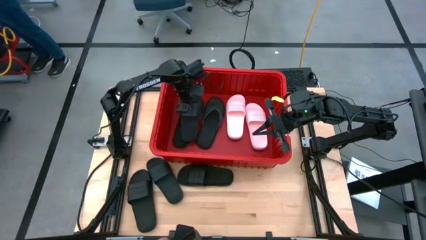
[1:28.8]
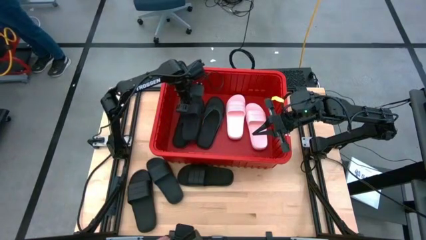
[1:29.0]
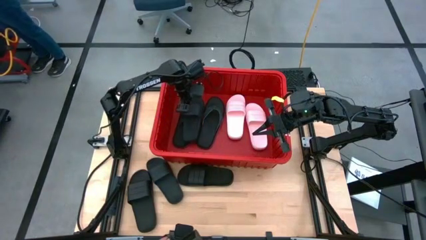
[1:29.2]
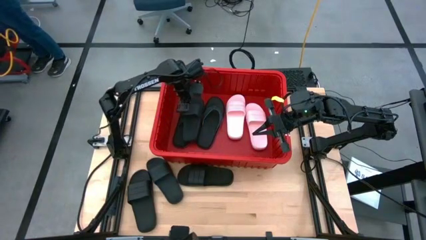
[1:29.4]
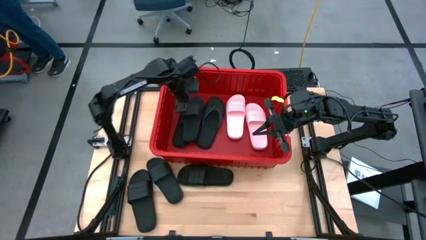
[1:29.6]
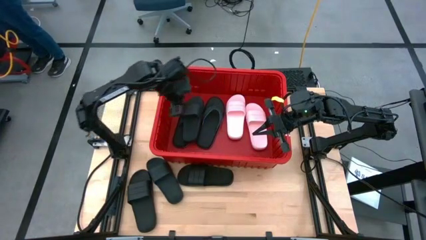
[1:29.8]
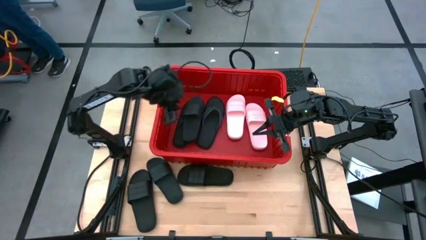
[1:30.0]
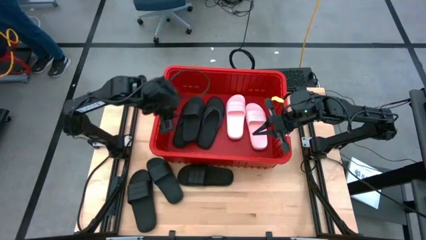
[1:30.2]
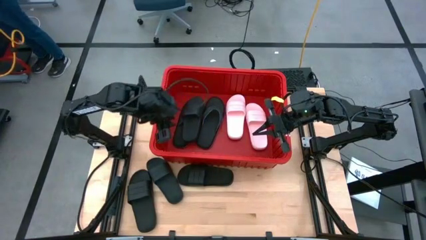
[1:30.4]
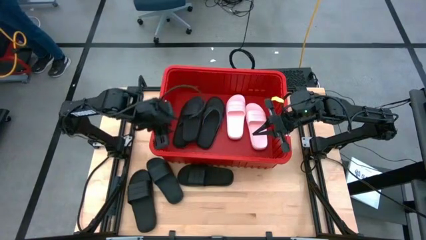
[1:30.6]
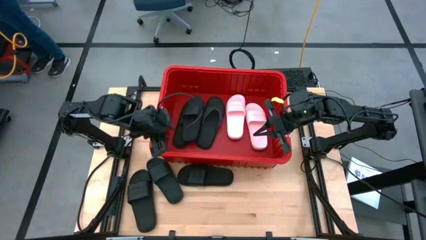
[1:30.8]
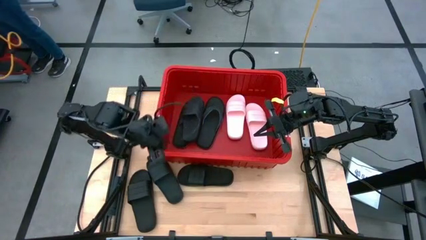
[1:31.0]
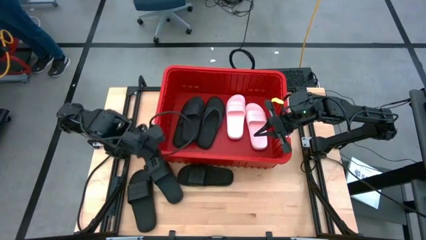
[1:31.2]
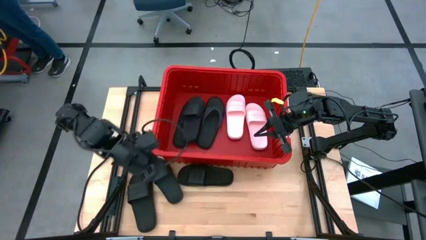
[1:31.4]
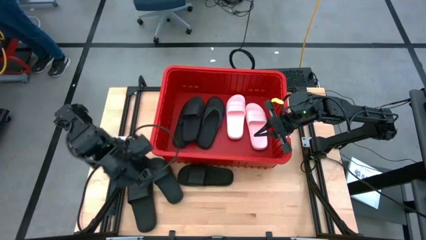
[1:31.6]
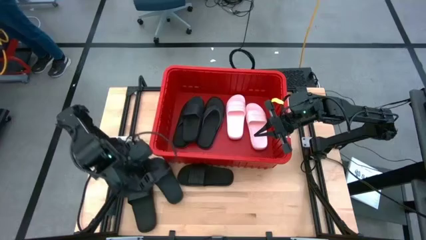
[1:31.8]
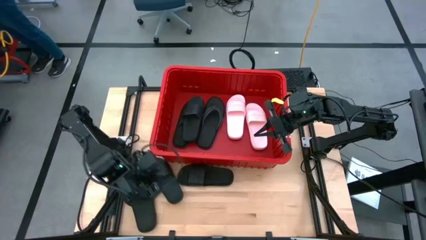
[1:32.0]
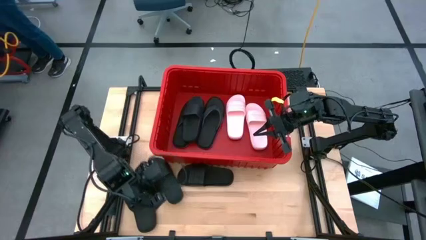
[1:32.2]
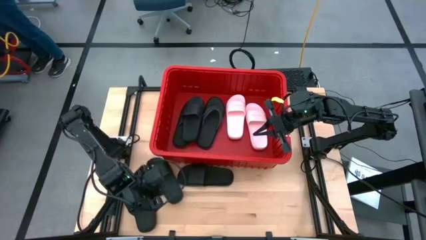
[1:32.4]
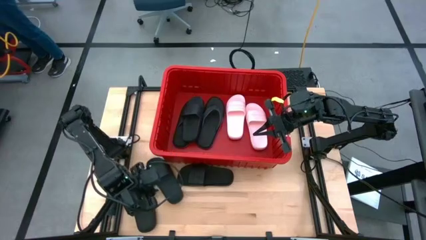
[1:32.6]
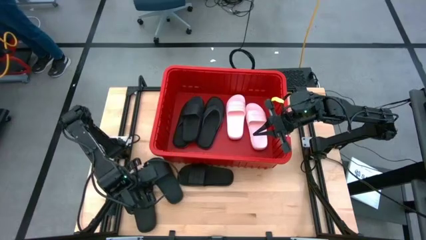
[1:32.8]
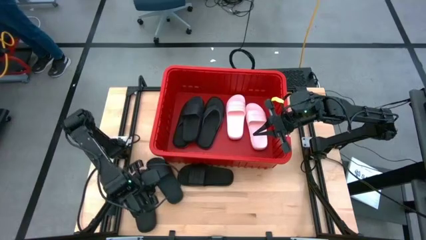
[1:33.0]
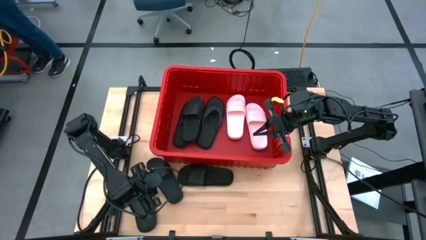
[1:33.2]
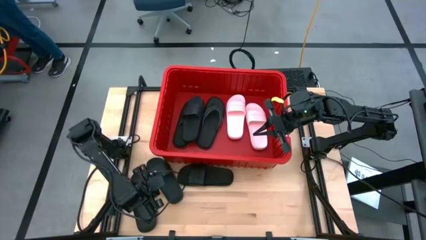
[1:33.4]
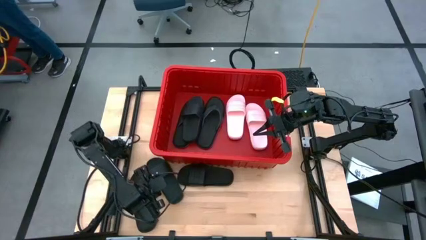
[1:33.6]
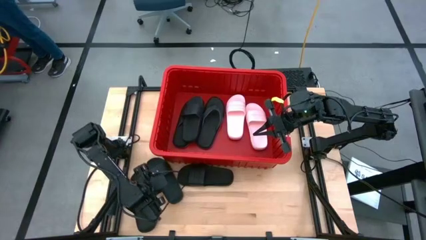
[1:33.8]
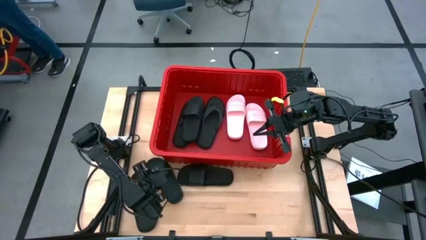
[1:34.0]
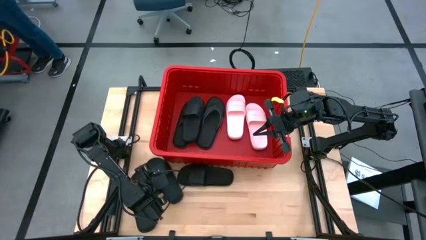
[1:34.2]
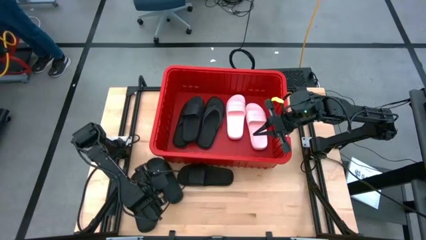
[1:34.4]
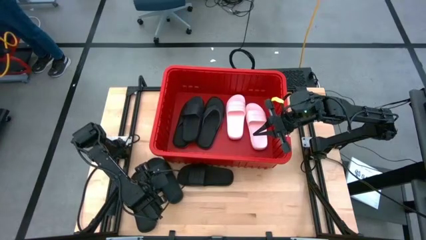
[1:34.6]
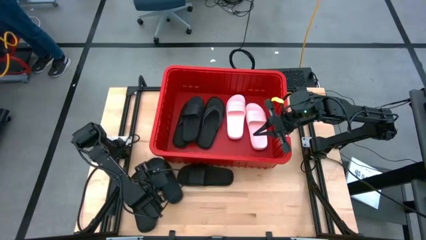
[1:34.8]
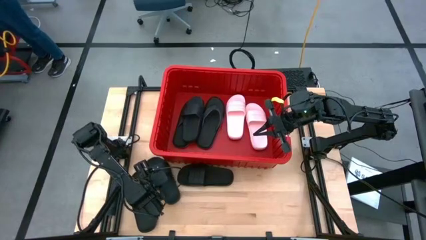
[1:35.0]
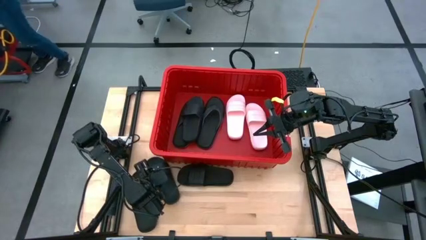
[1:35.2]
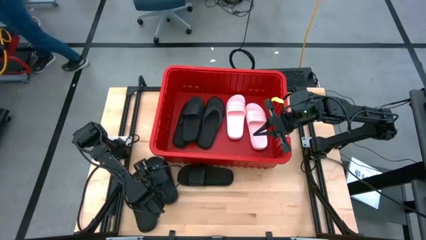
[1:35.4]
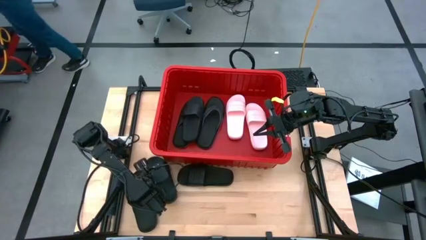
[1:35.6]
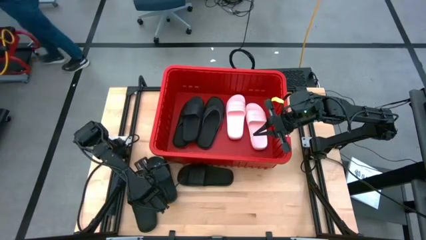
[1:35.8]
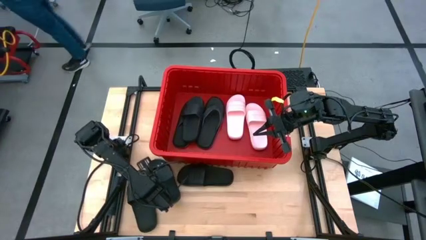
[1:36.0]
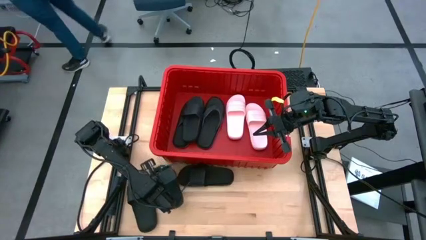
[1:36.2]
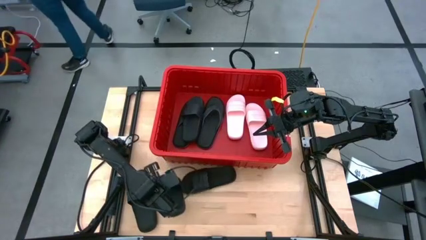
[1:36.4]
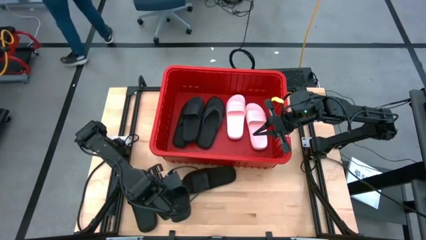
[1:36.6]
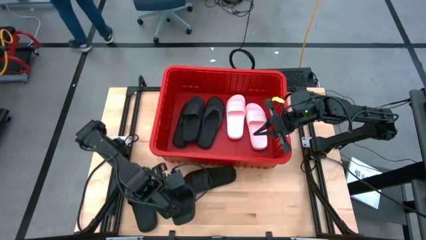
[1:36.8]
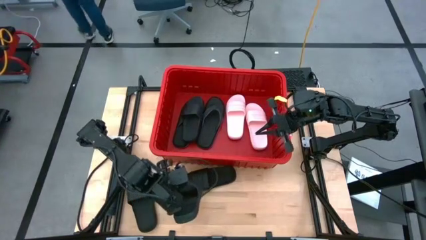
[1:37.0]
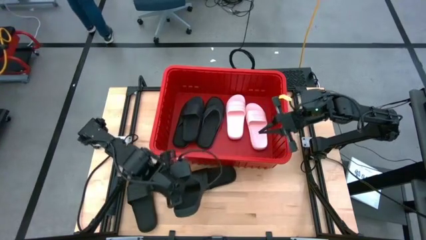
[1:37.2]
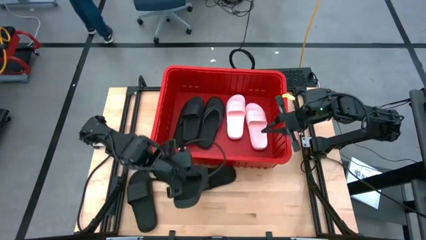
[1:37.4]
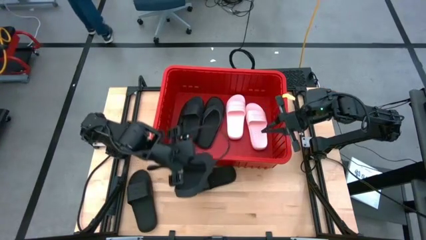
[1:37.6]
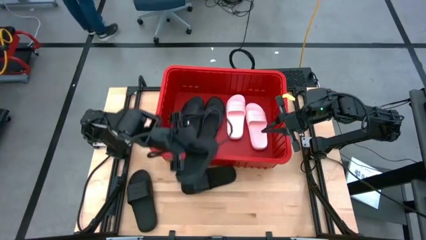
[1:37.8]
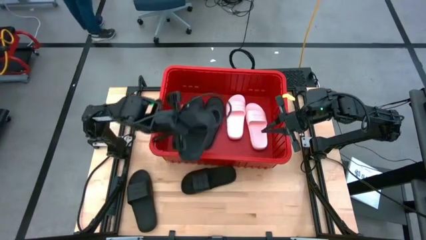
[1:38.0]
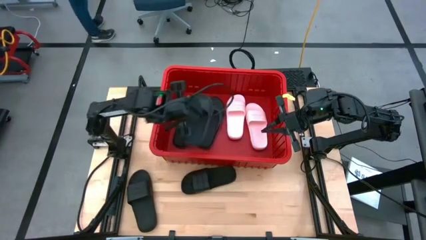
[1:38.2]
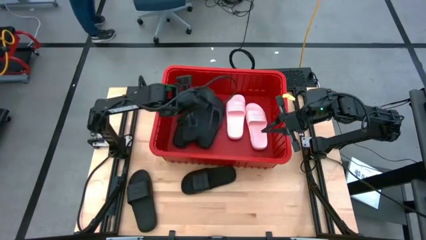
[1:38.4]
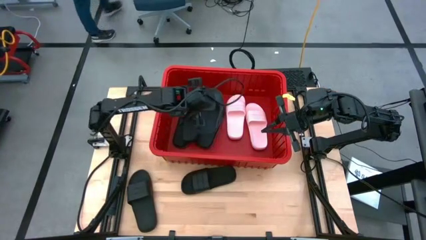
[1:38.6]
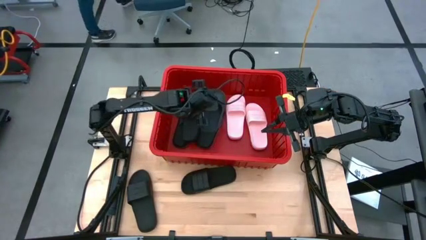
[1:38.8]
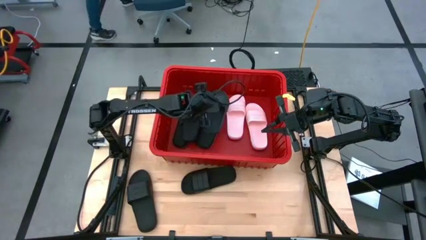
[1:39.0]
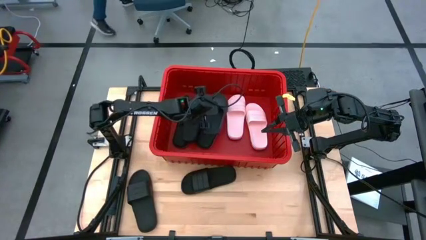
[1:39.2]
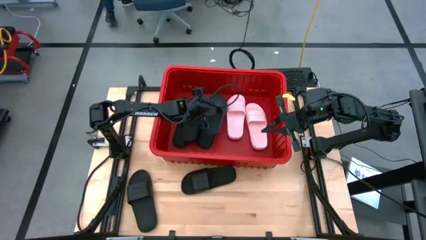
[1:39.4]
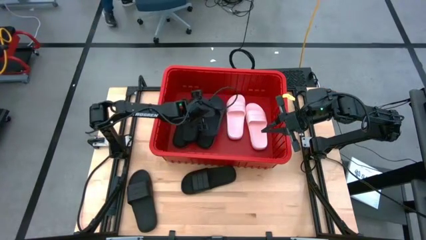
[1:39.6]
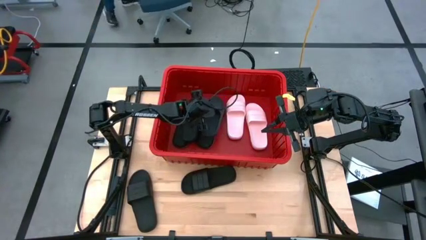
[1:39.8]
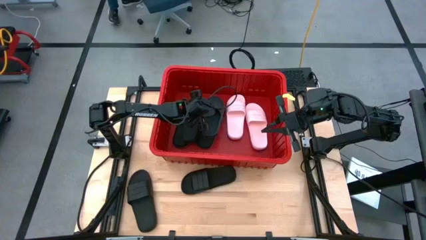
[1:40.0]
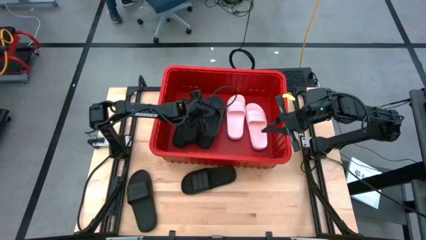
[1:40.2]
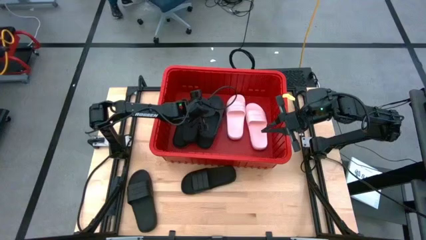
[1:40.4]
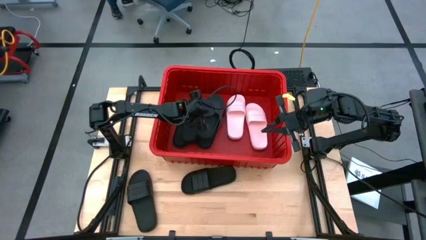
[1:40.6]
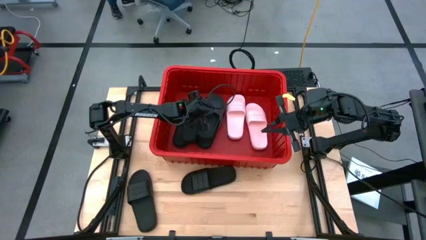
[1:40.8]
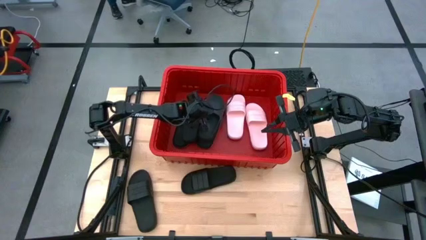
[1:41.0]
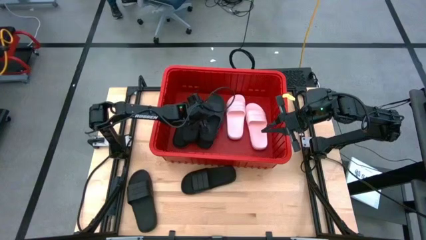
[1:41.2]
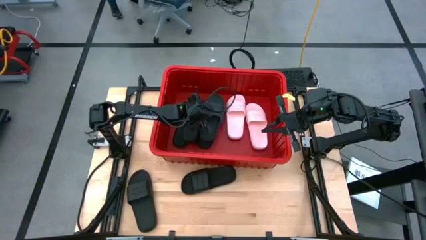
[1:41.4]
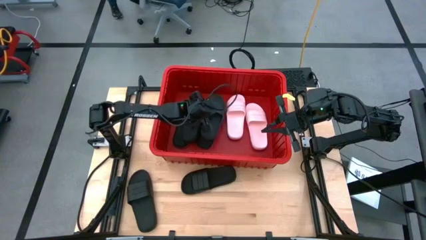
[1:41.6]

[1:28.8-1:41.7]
Task: Pick and place slides into bin
Put the black slide into the red bin
